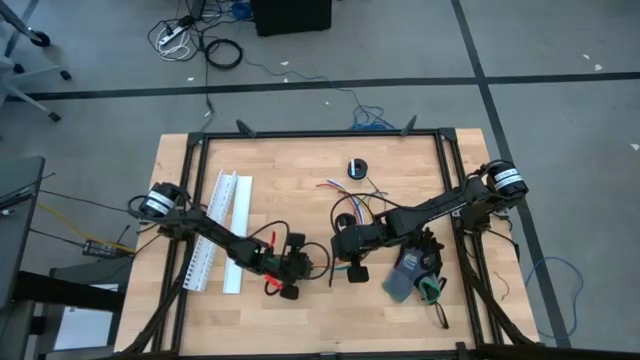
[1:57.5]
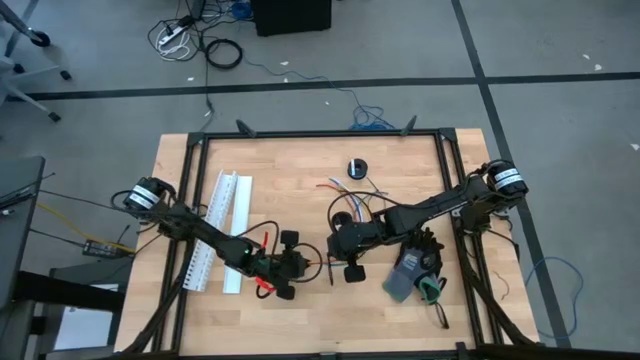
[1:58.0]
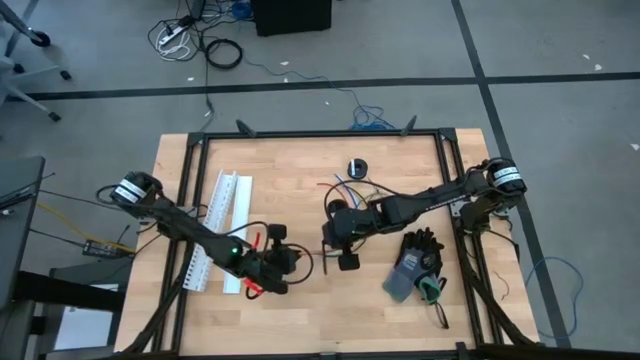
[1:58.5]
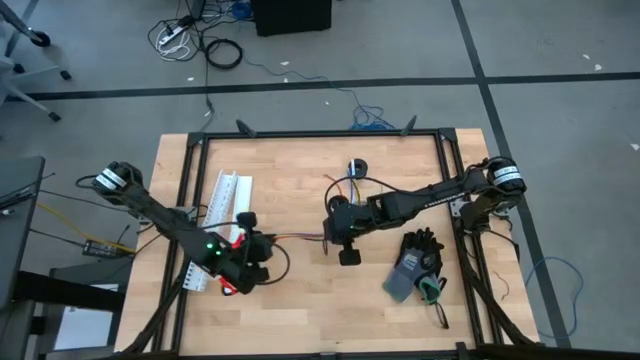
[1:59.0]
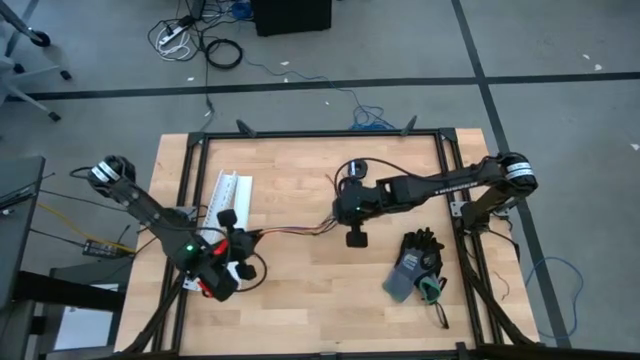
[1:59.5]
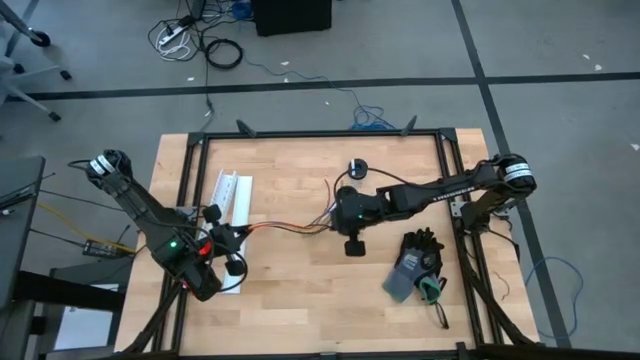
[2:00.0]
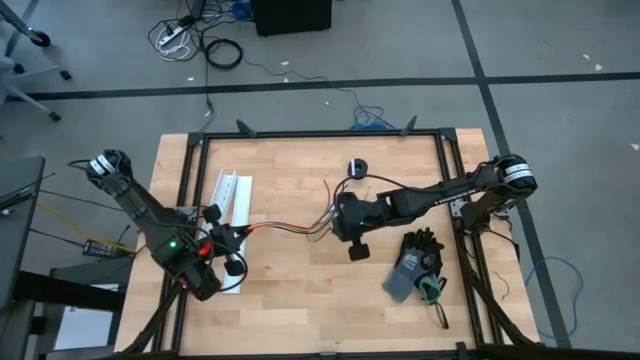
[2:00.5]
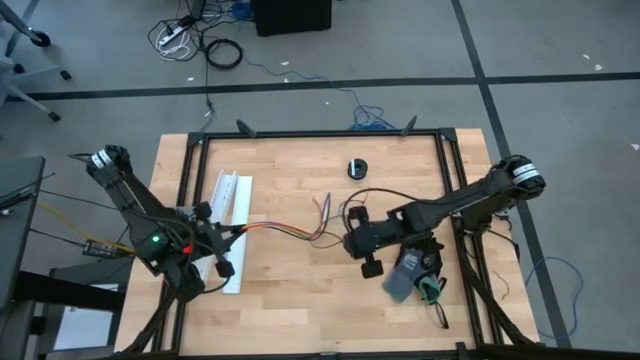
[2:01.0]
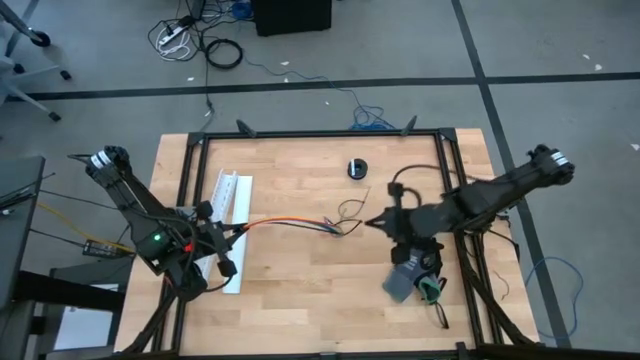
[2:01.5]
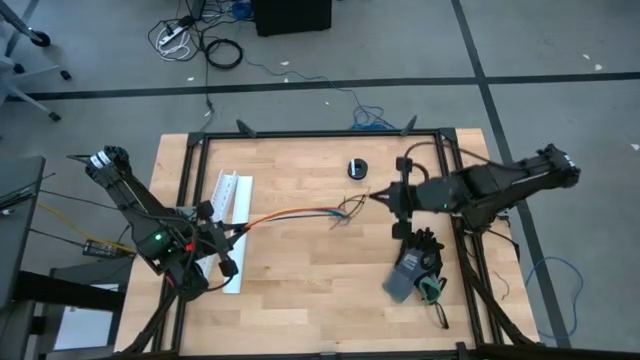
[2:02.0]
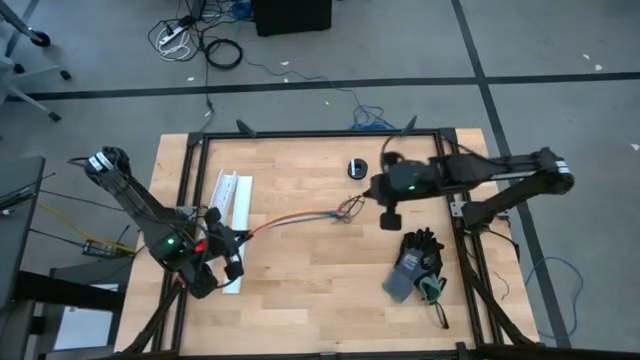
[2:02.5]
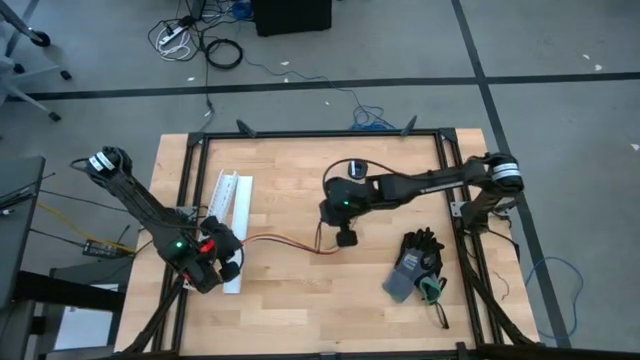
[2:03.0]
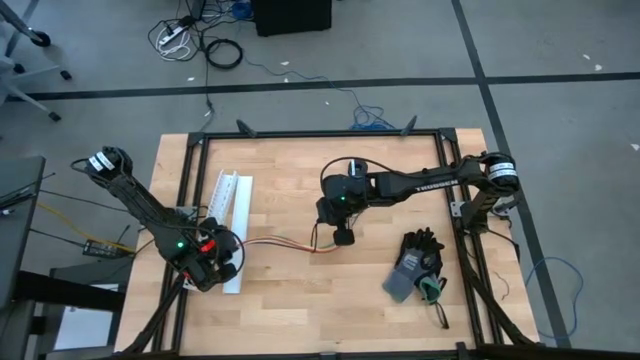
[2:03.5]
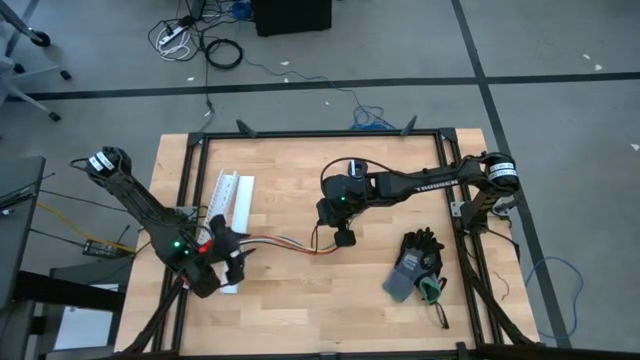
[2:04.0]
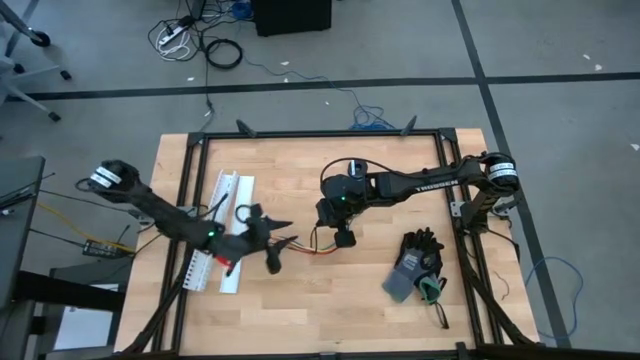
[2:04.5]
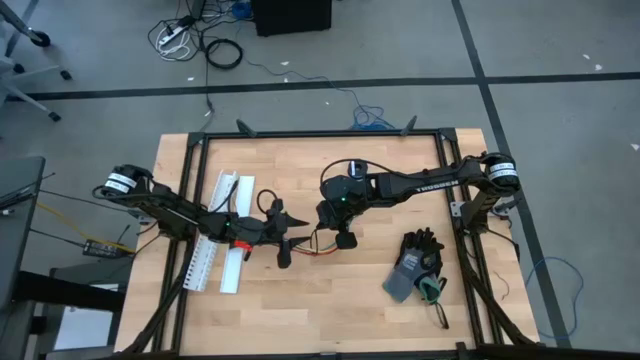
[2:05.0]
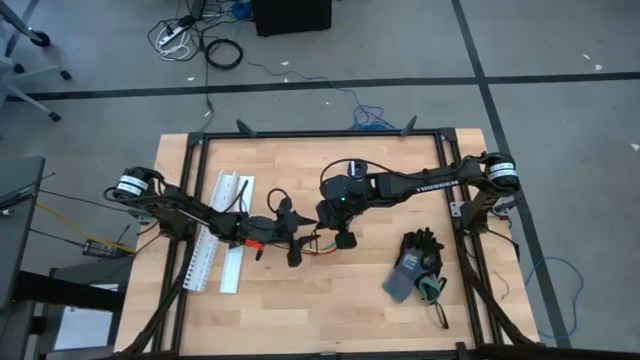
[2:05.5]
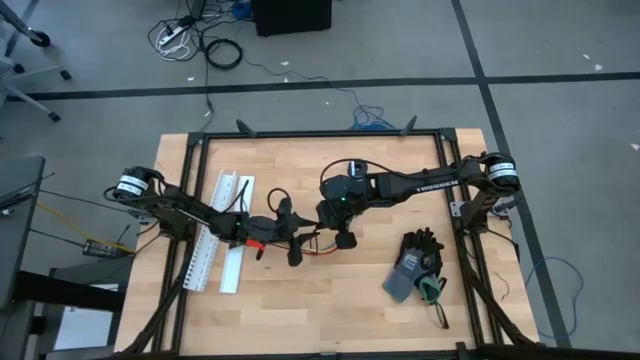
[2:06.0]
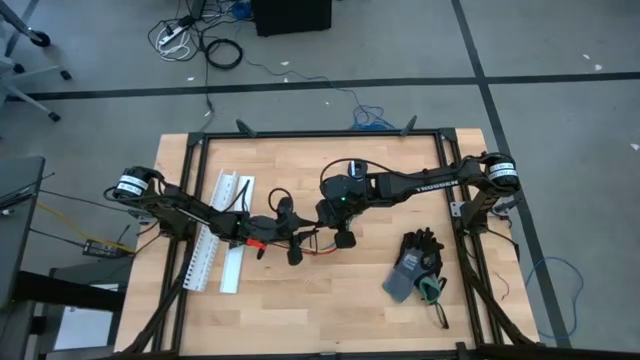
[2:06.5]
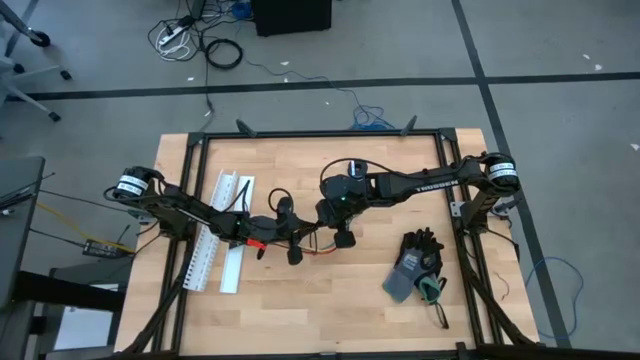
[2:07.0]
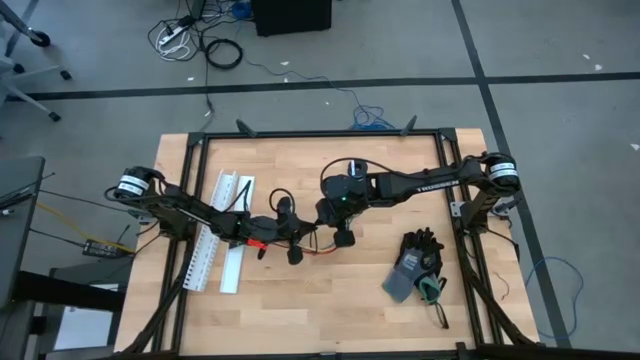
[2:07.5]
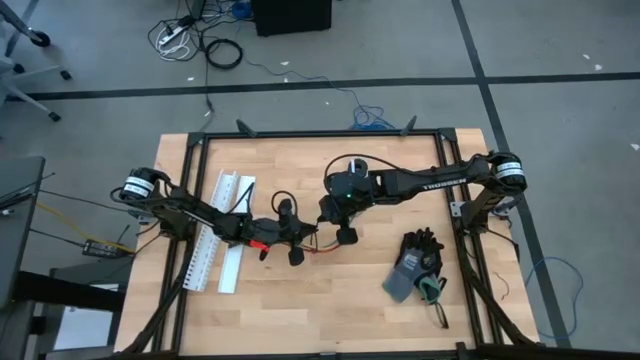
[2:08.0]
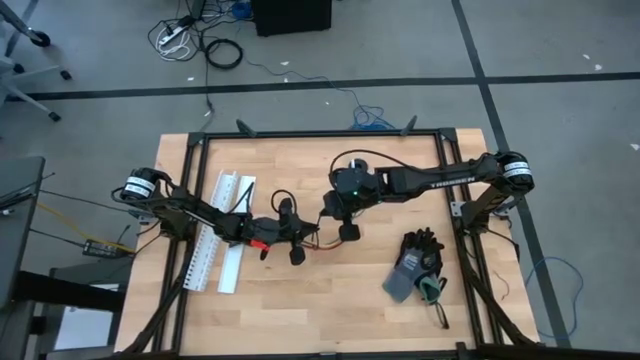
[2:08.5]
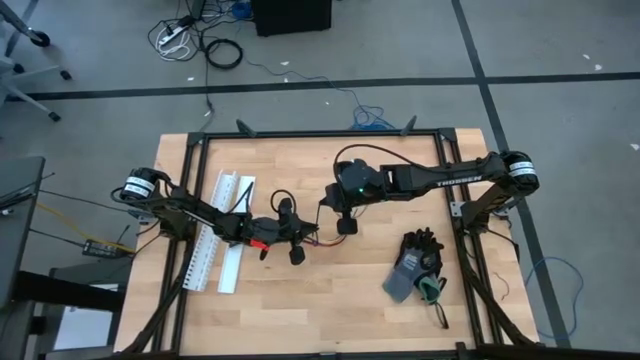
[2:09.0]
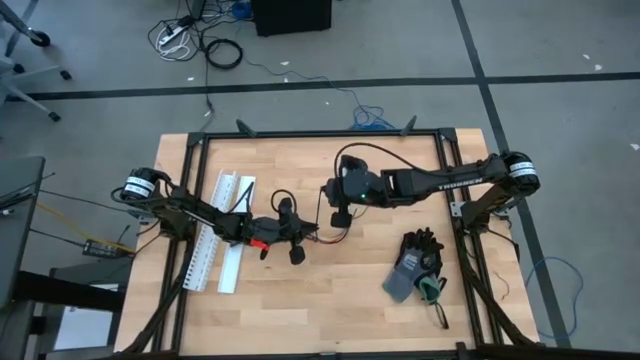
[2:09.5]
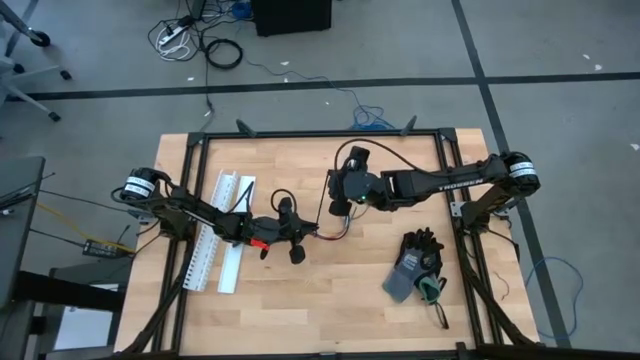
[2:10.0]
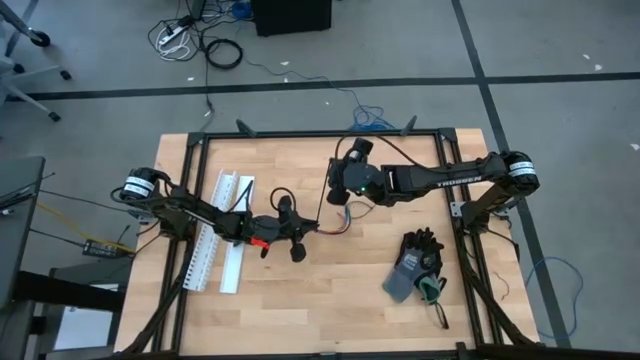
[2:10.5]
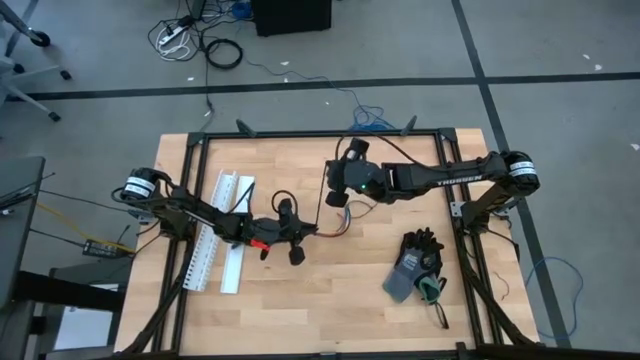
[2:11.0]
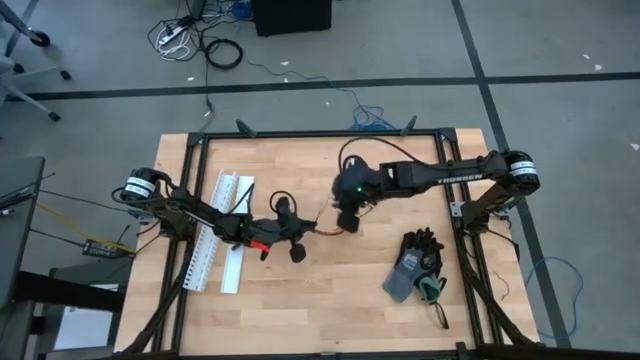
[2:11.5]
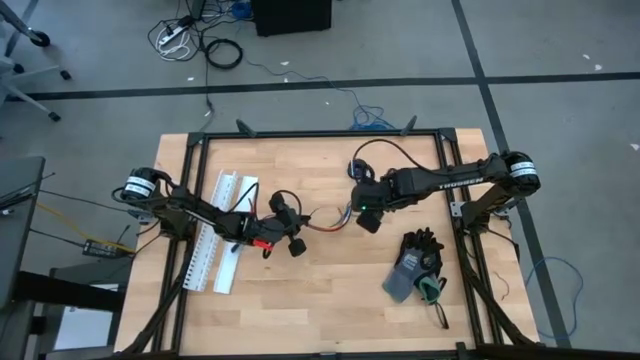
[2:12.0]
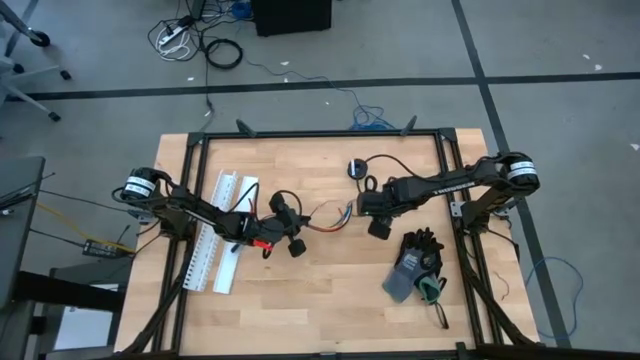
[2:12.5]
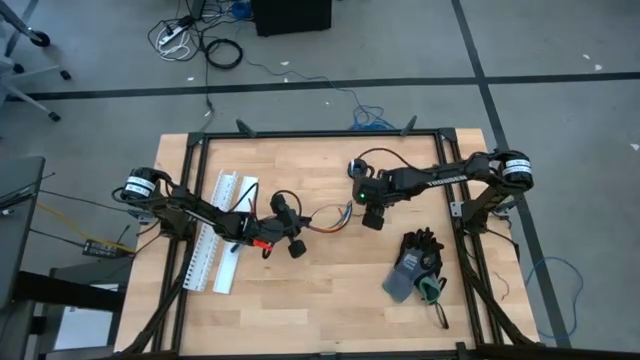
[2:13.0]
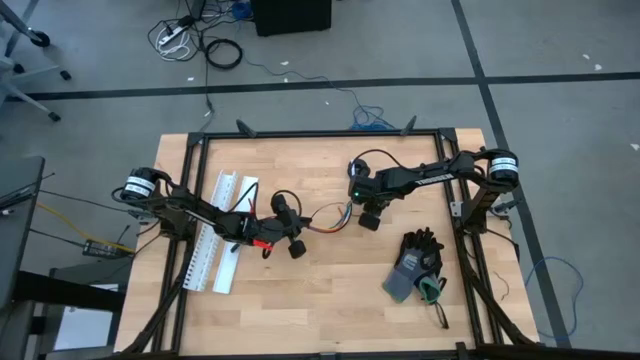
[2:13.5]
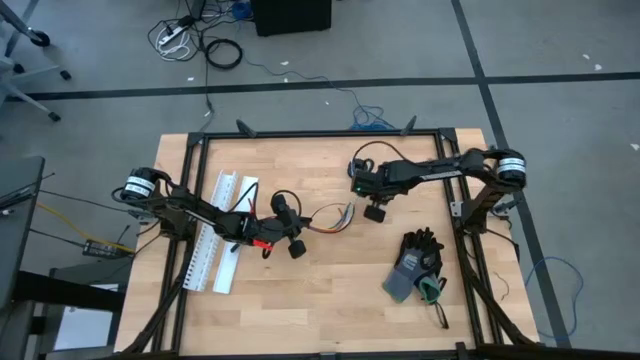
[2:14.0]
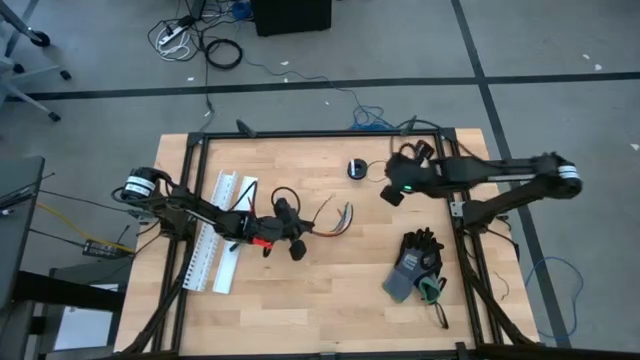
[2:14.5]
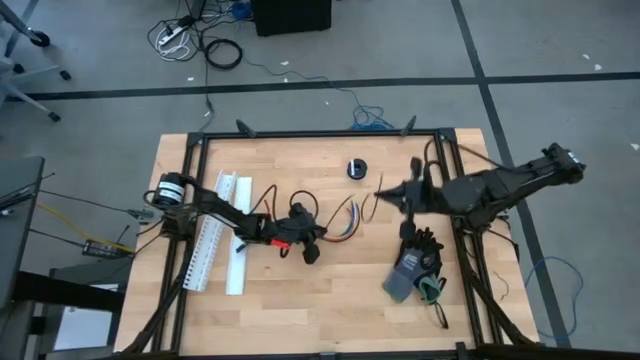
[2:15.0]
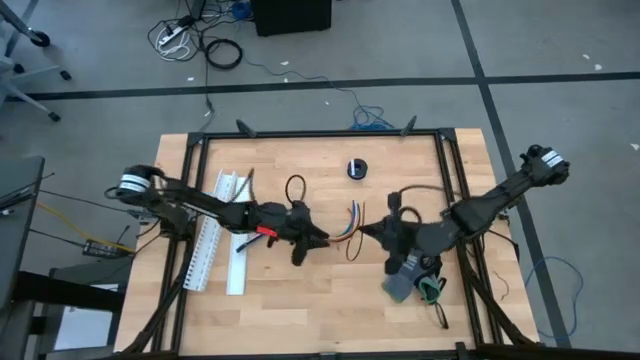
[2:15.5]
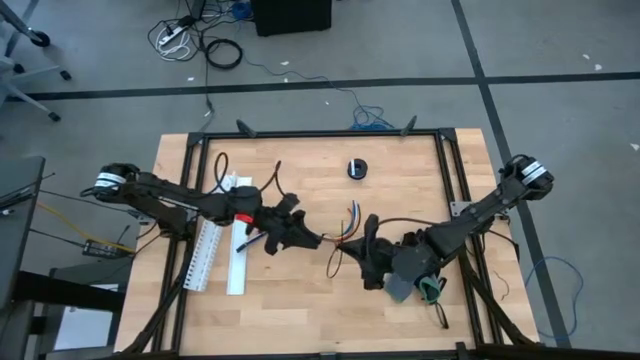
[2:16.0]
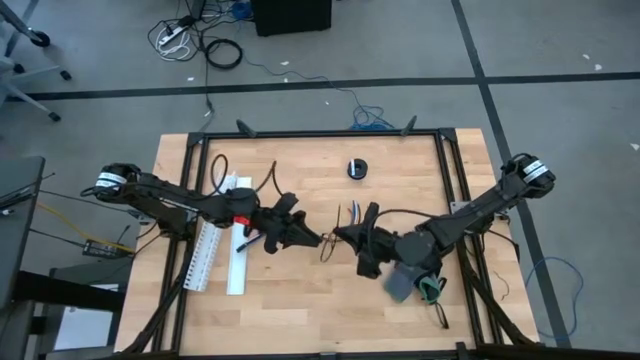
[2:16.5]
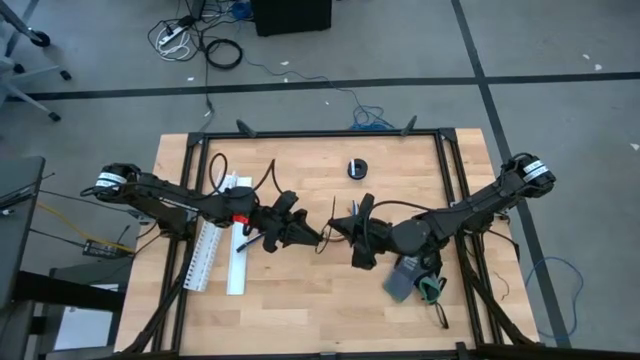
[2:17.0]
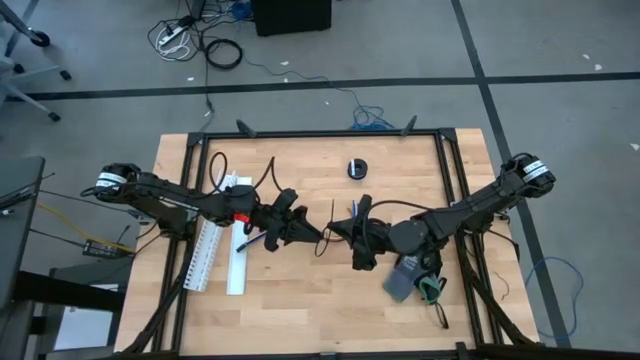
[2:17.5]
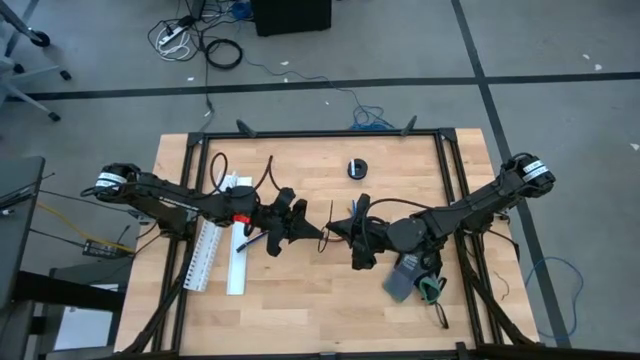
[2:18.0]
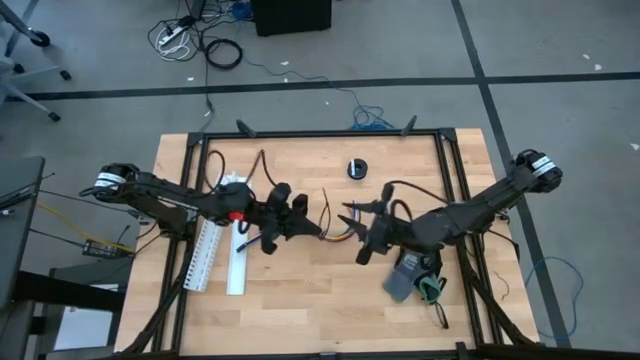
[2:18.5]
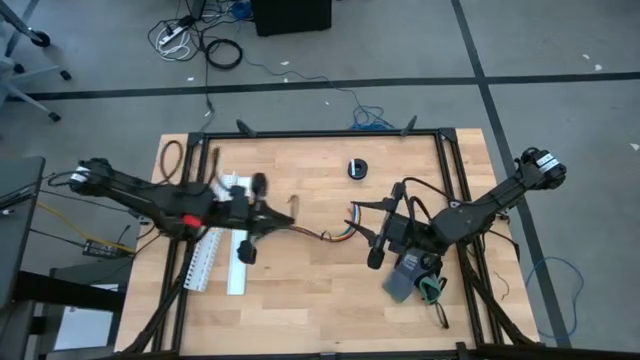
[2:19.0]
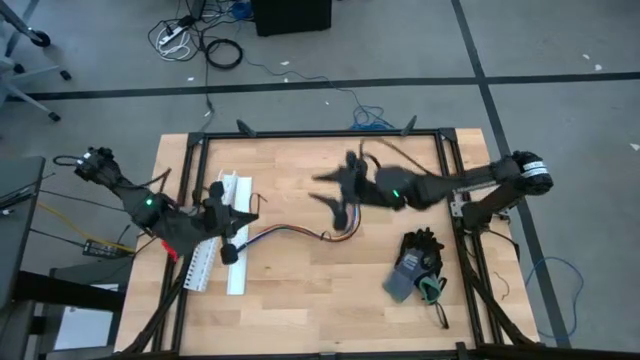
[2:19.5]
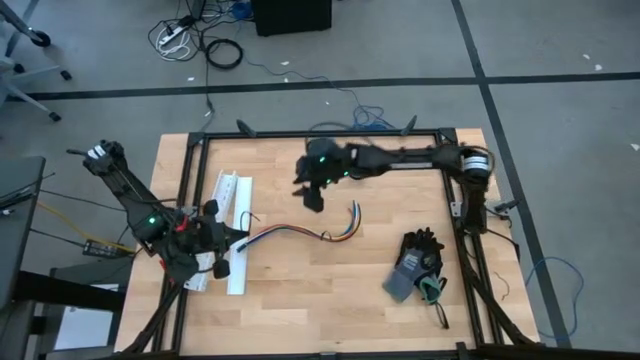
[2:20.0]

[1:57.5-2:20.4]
Task: Ziptie cables
Wrap the cables together using a ziptie
